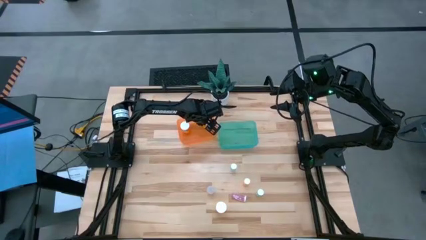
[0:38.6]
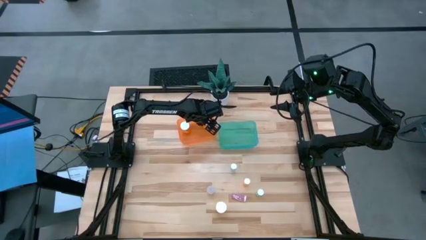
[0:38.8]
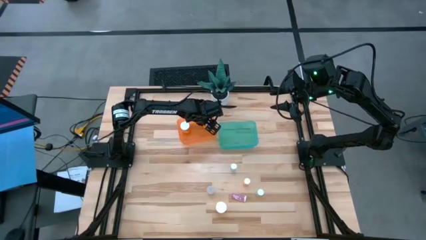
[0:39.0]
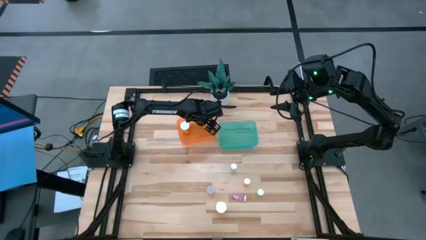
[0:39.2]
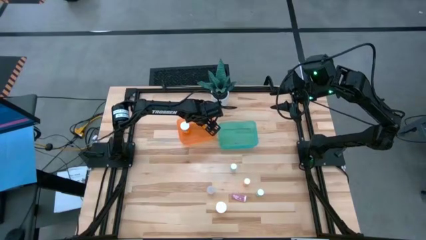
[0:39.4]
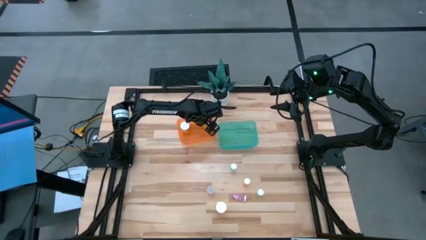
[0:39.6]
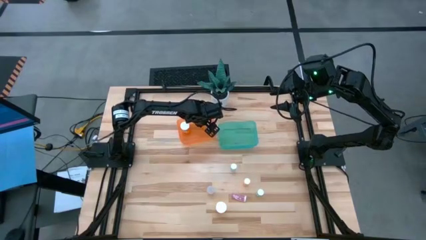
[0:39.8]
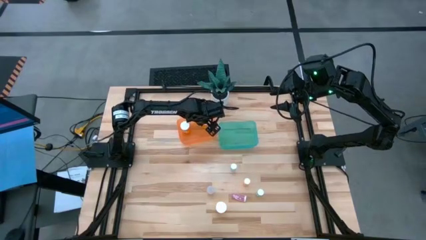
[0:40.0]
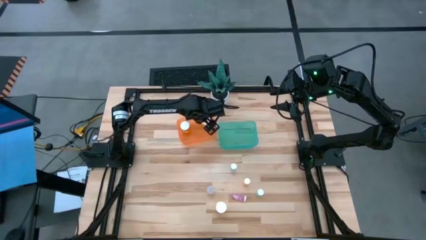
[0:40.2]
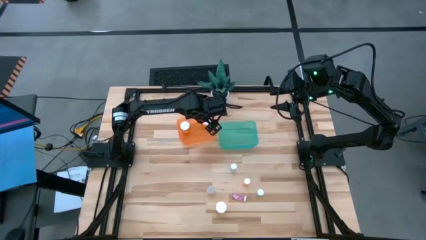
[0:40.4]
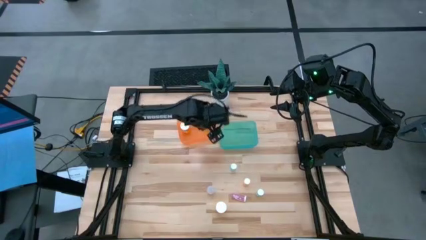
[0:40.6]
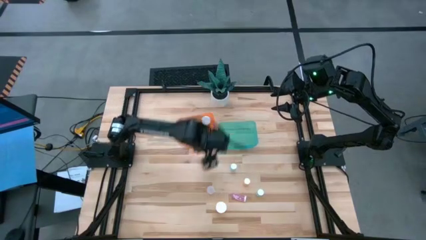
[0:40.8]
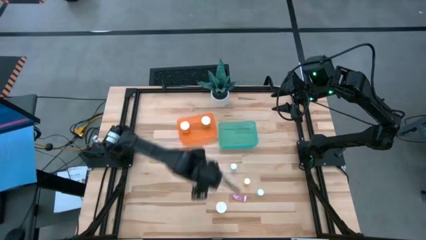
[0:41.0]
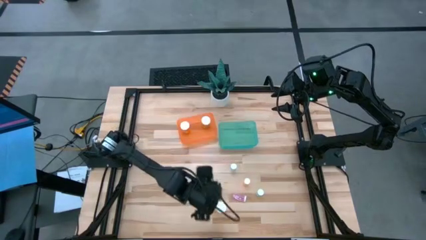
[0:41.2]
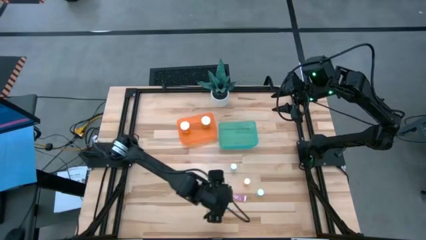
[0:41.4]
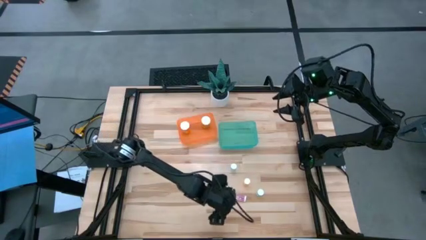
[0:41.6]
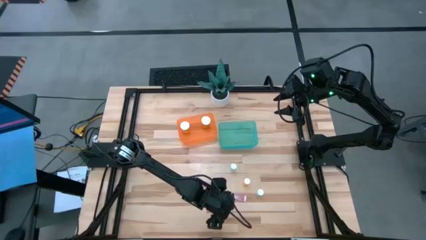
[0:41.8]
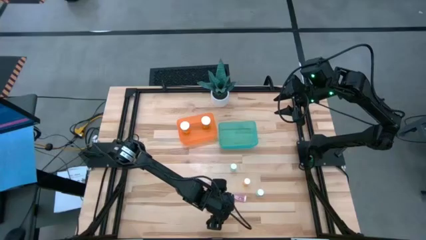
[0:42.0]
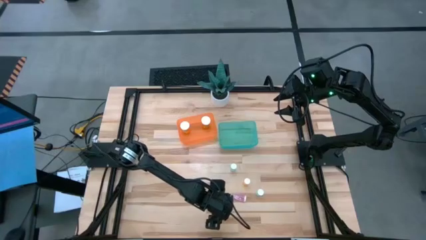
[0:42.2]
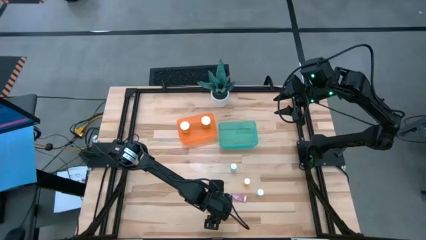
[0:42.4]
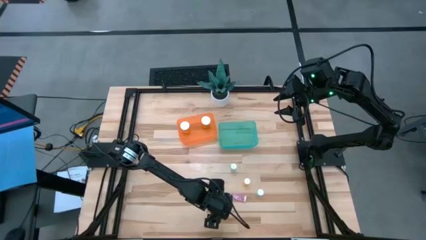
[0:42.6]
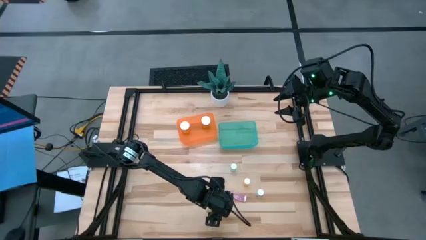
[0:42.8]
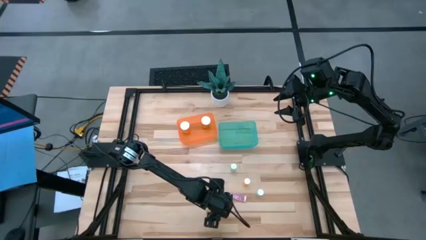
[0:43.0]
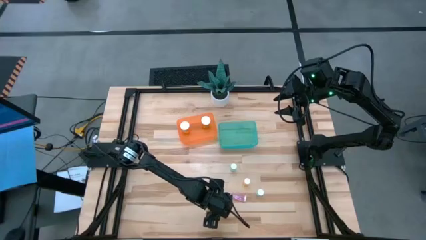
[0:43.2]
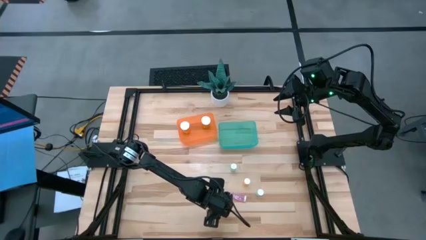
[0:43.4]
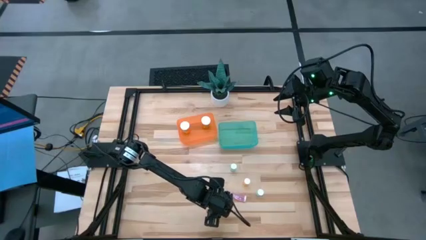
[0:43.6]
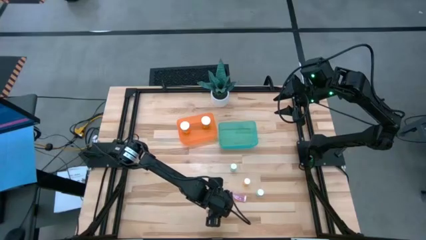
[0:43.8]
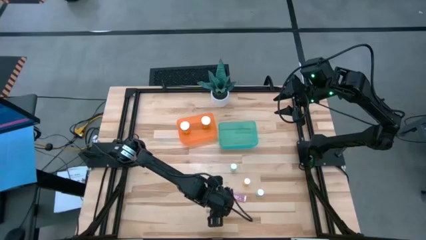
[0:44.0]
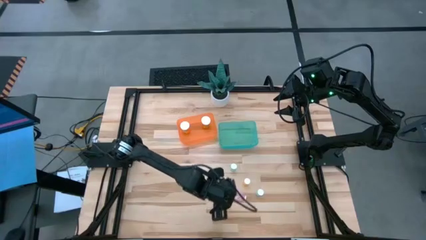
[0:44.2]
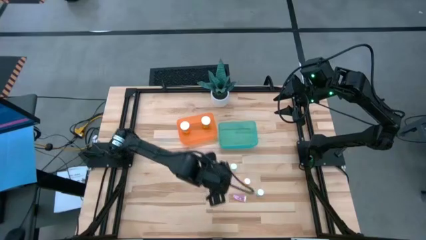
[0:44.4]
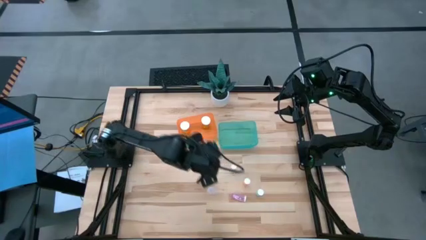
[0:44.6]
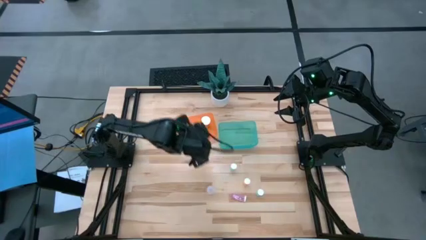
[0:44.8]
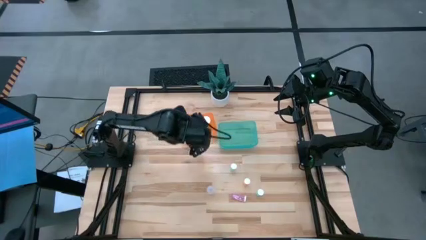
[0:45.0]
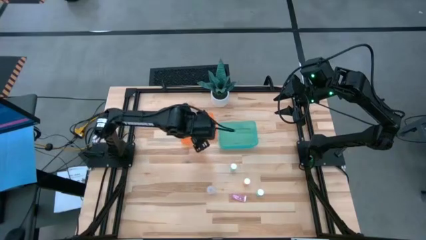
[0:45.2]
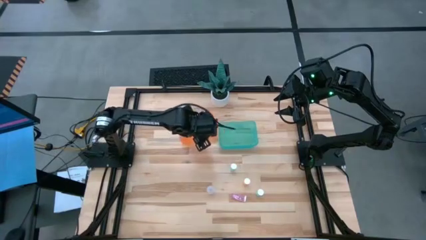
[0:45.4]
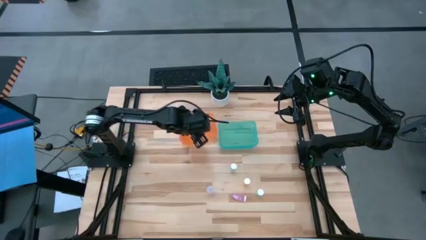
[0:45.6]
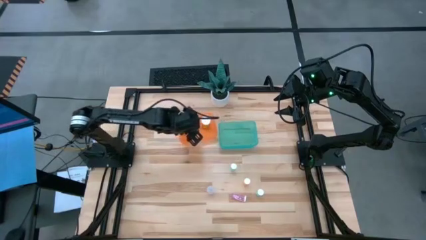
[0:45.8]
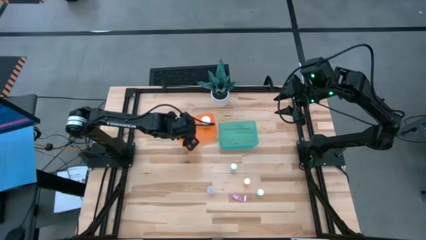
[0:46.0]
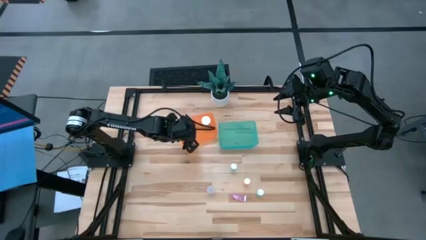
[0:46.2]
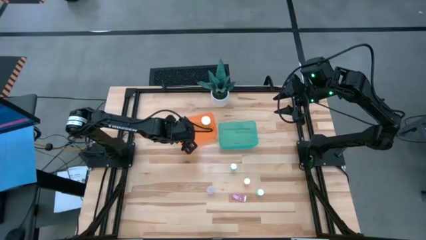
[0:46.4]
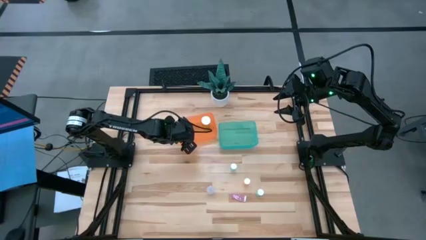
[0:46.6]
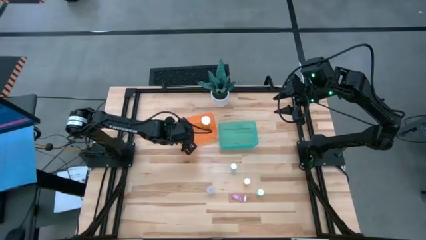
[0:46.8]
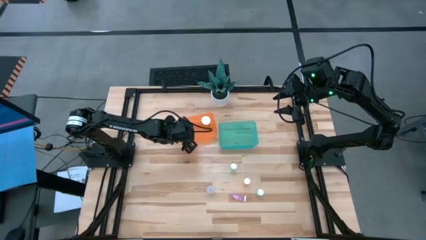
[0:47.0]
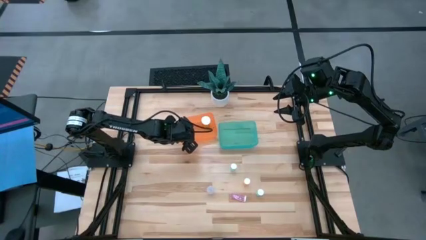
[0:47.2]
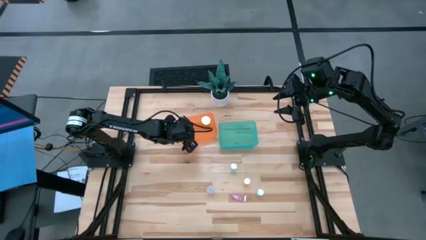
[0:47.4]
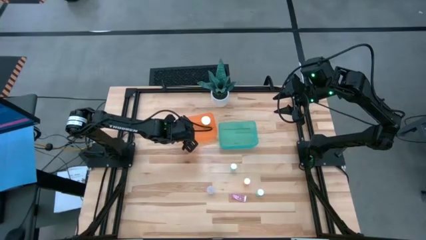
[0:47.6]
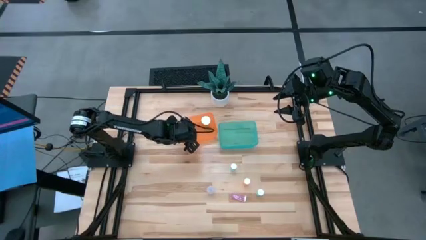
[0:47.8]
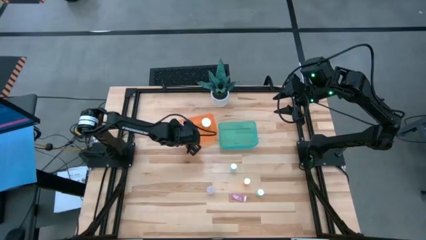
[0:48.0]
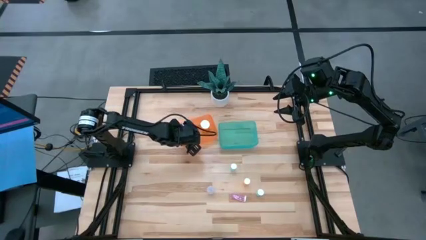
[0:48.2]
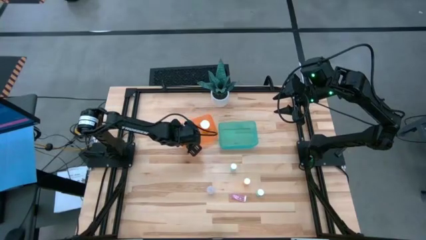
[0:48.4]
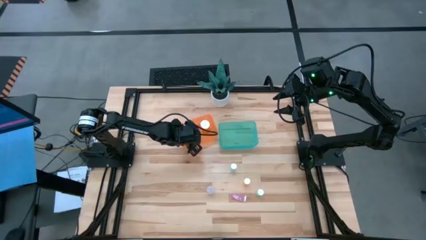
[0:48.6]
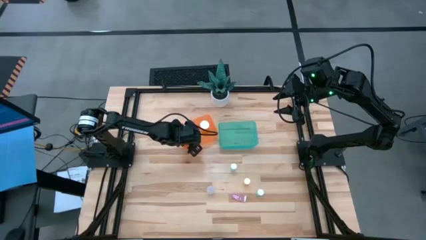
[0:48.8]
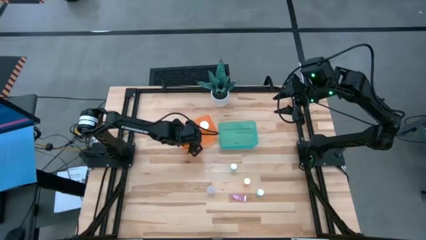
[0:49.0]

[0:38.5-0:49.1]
Task: Pick and place medicine bottles into bin by pill shape (circle, oval)
Put the orange capsule bottle into the orange bin

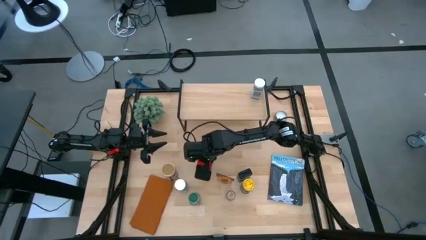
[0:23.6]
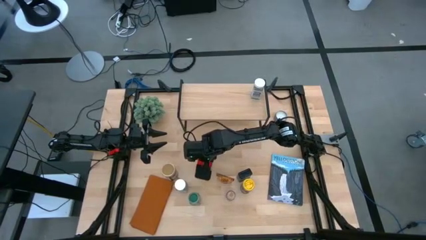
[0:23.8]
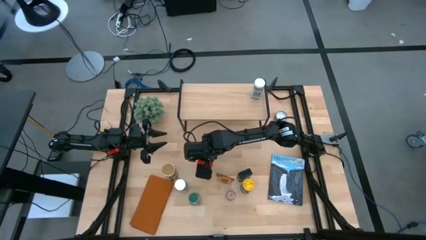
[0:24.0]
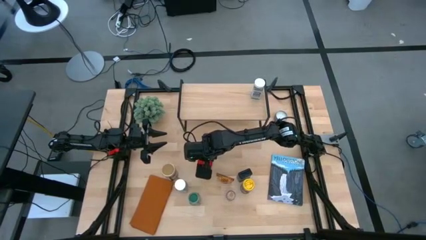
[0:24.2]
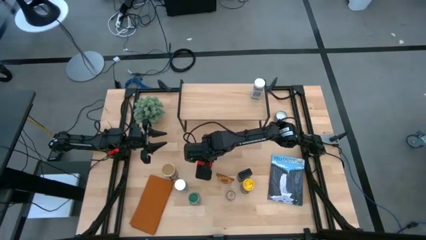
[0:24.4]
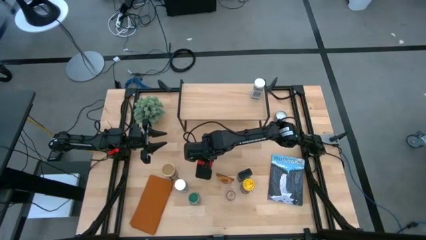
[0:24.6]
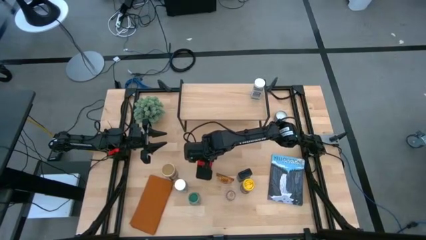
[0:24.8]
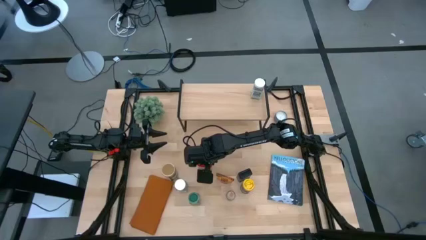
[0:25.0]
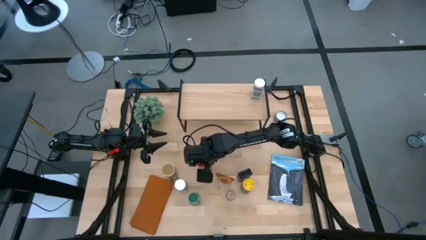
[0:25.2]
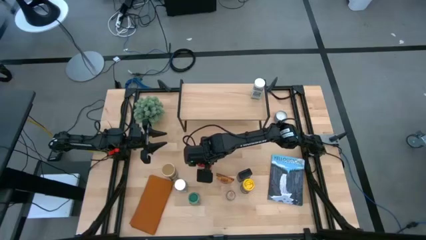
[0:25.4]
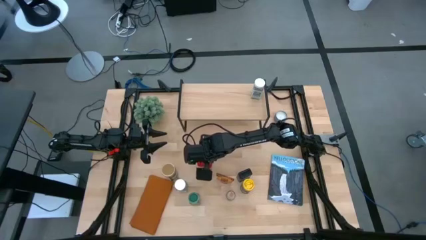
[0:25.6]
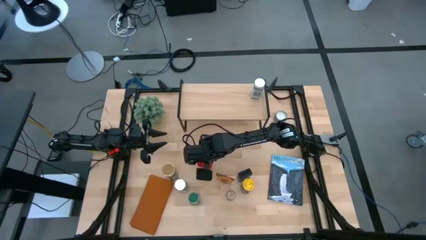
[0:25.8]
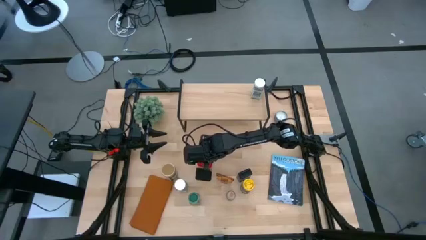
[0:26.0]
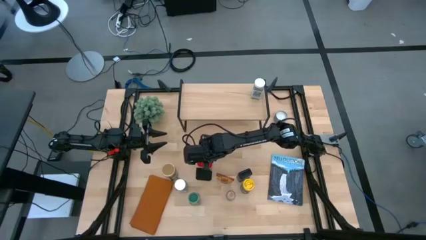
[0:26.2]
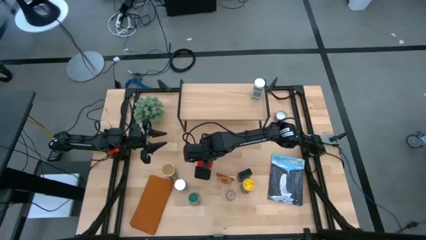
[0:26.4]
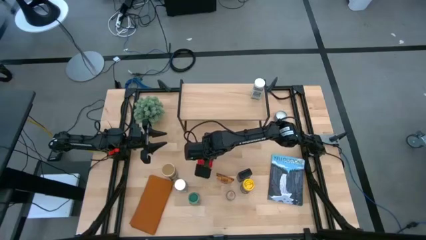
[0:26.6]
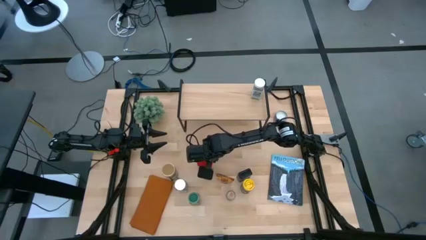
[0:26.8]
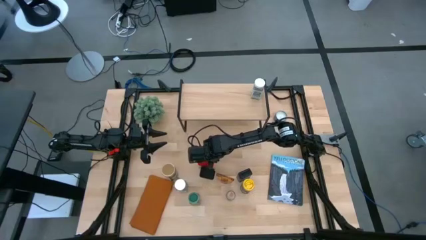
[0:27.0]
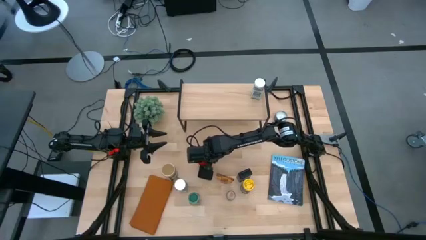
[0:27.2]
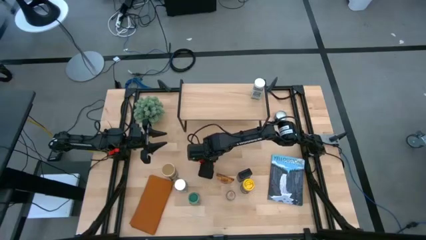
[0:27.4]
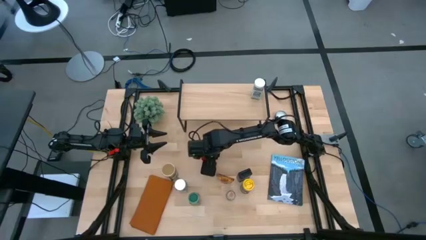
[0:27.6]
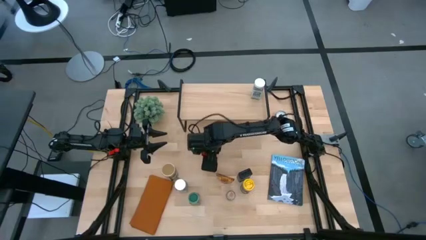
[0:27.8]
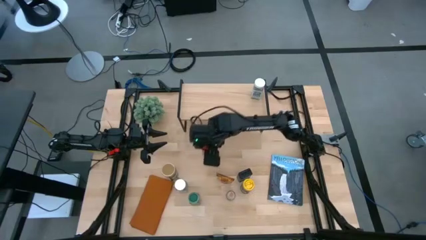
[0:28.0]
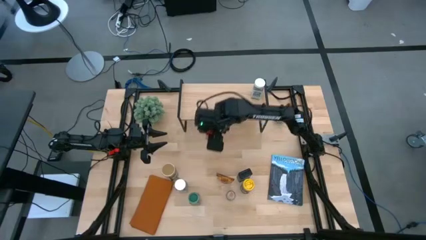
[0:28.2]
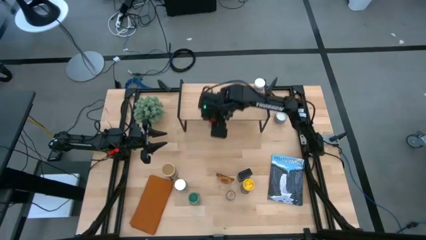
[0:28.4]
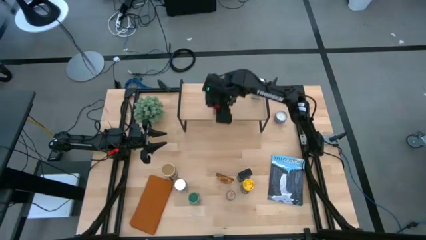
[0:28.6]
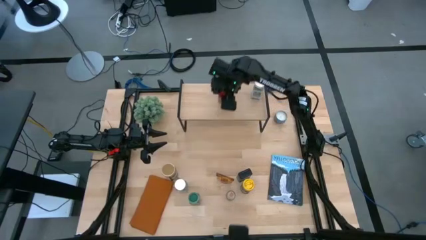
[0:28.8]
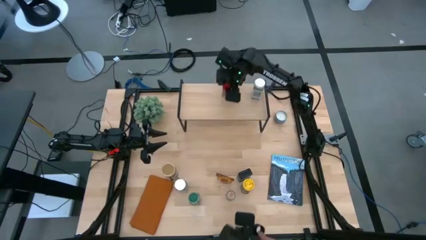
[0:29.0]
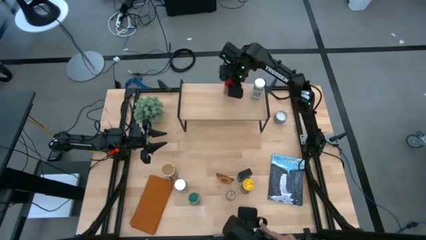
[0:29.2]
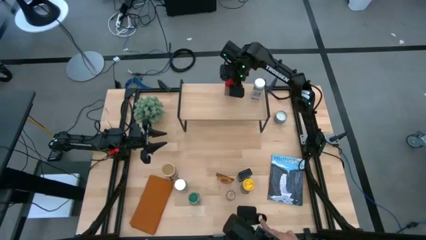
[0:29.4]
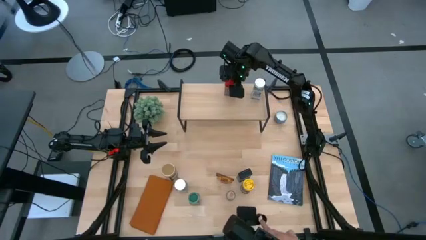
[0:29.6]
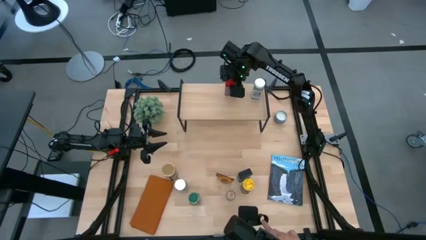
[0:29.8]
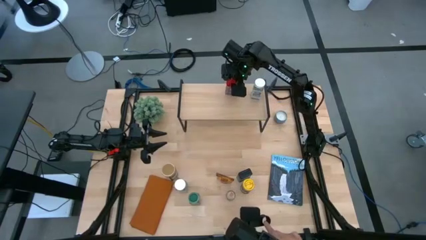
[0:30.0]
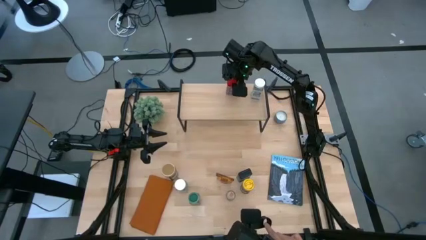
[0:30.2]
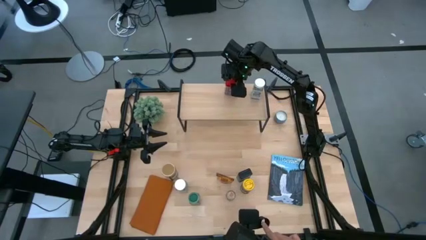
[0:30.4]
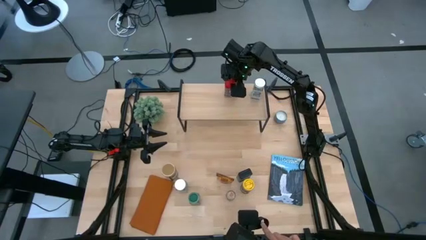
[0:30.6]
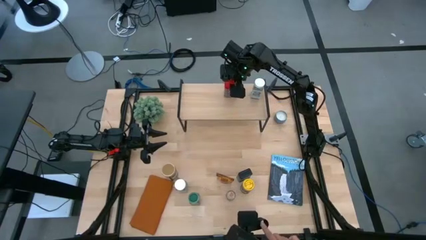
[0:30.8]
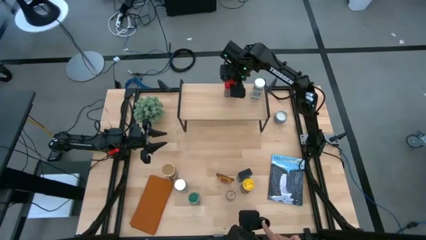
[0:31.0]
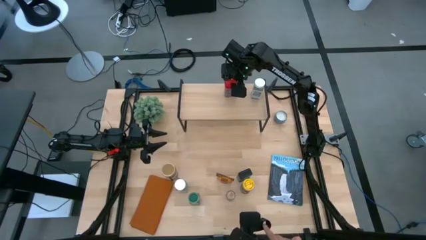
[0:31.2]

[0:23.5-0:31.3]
Task: Shelf spices
Put the red seasoning can on the shelf
